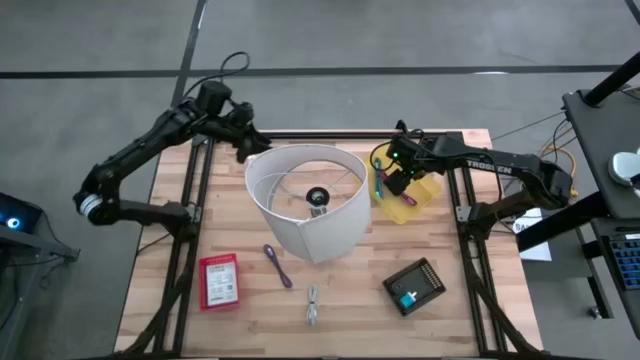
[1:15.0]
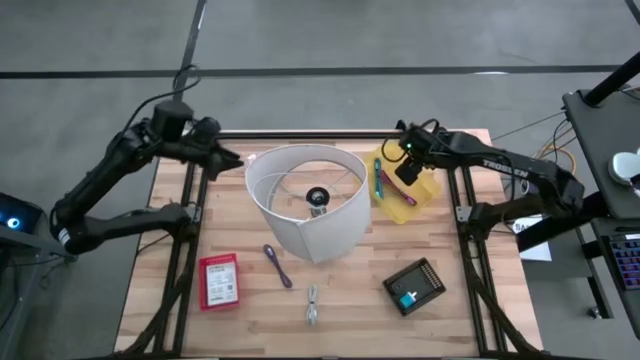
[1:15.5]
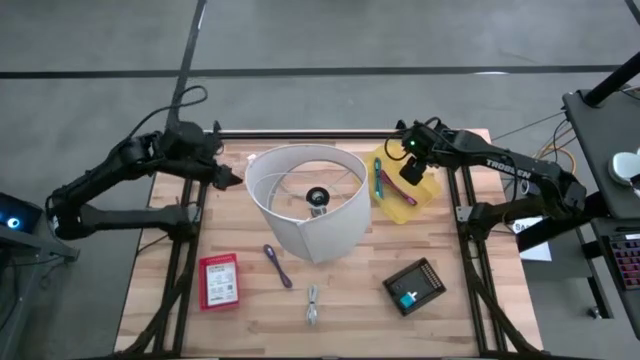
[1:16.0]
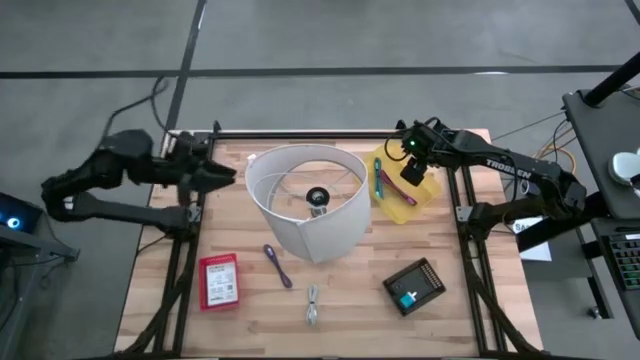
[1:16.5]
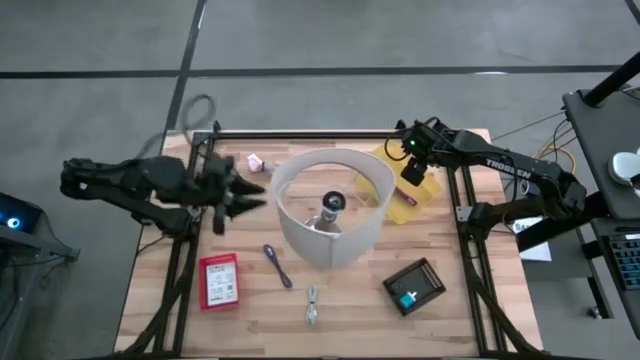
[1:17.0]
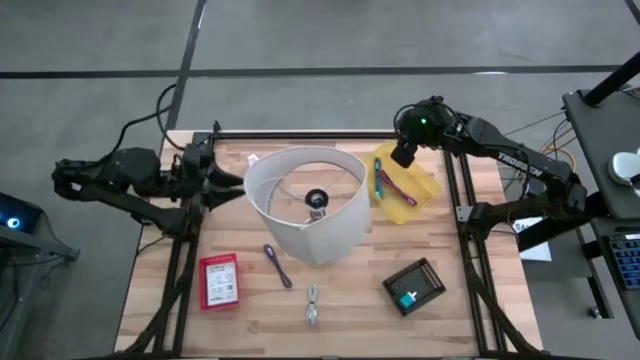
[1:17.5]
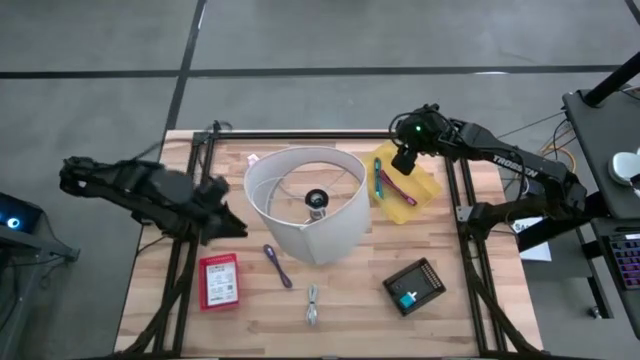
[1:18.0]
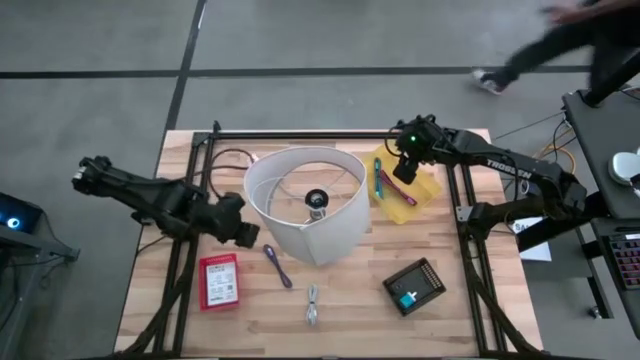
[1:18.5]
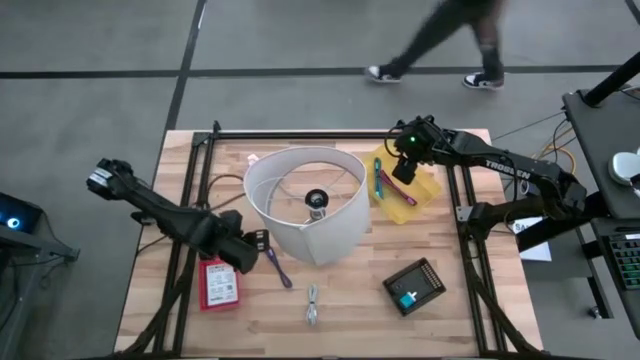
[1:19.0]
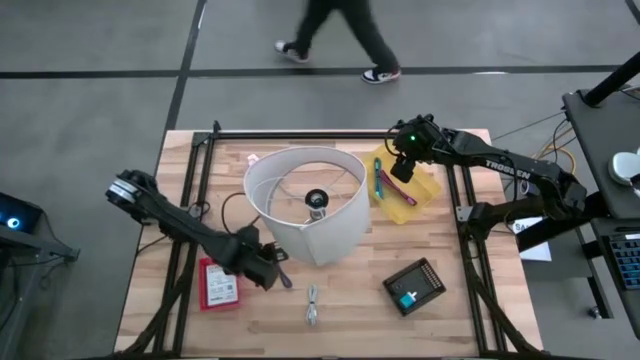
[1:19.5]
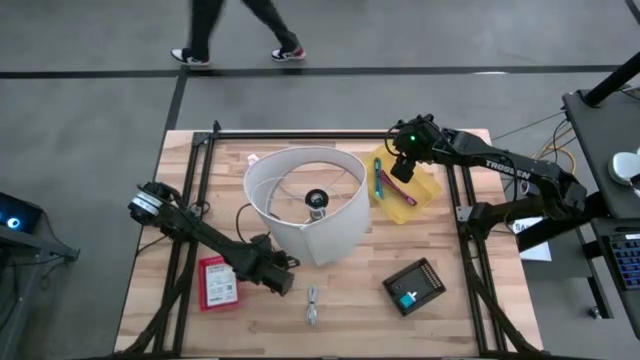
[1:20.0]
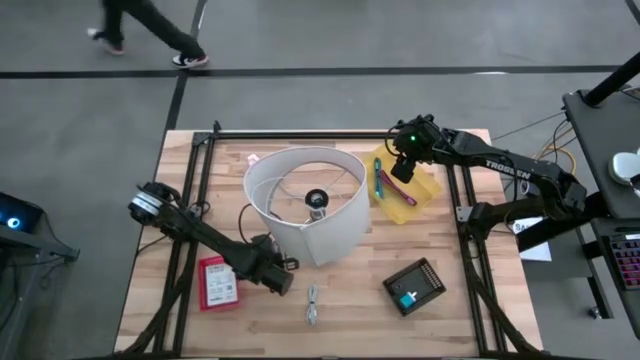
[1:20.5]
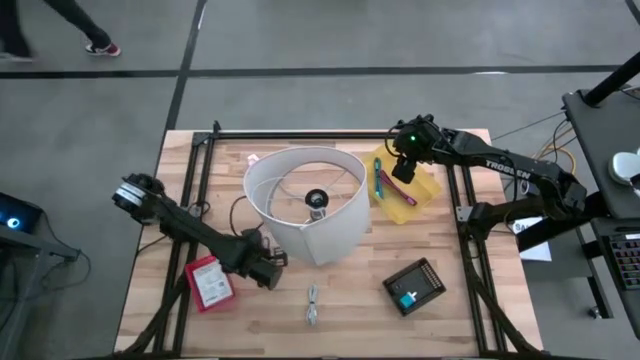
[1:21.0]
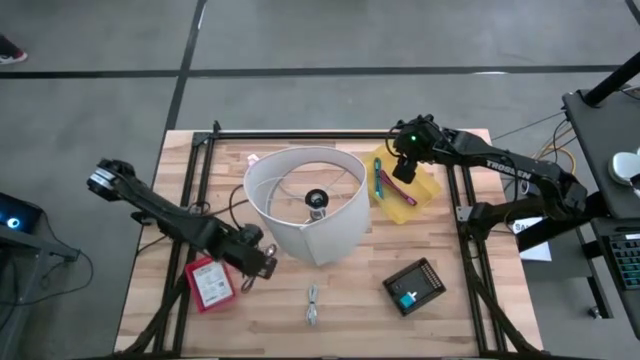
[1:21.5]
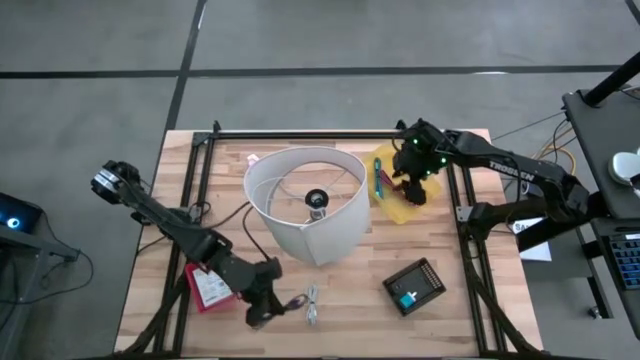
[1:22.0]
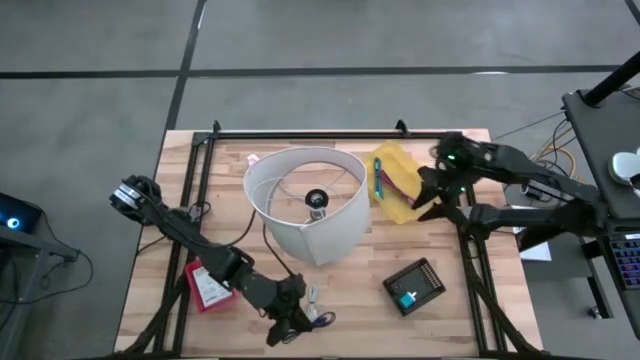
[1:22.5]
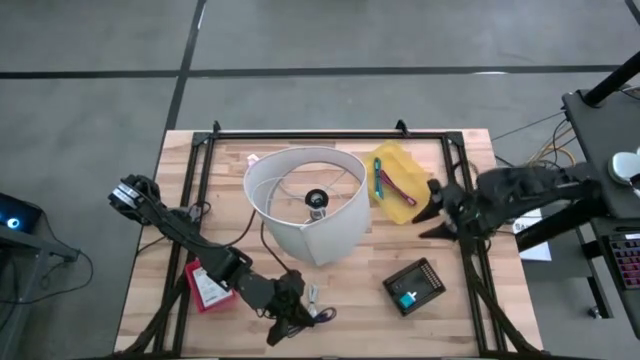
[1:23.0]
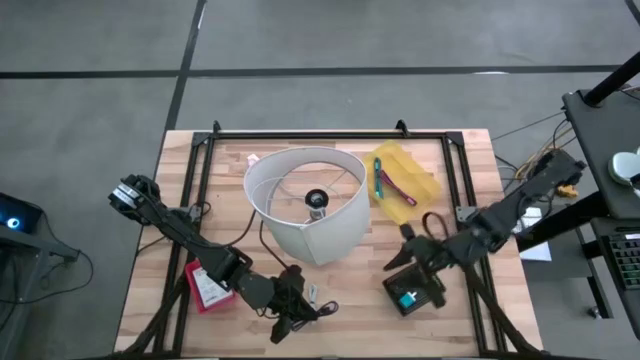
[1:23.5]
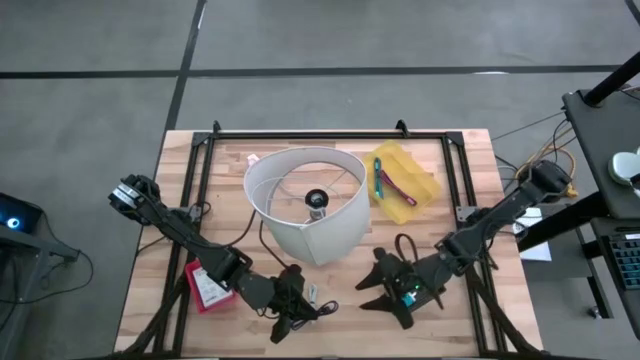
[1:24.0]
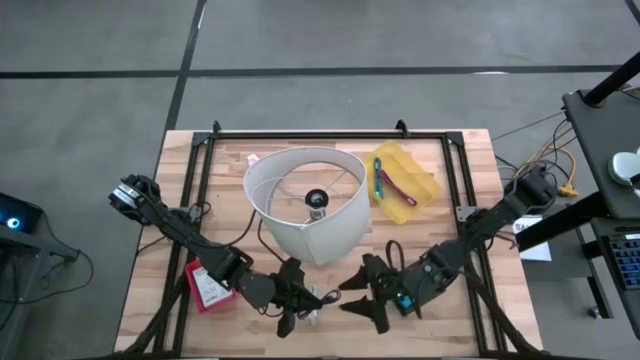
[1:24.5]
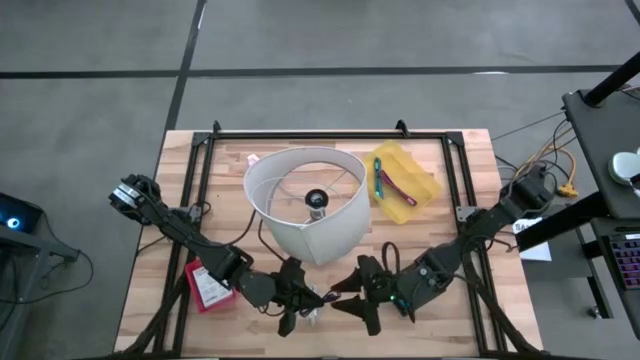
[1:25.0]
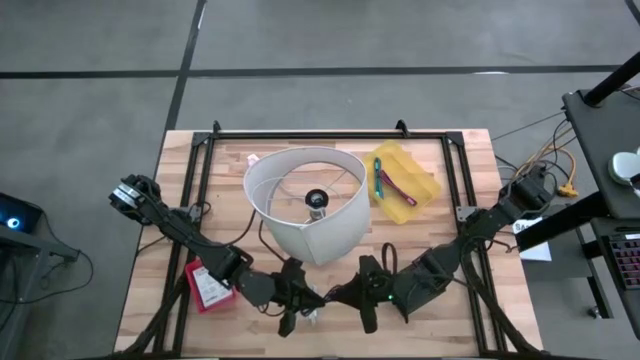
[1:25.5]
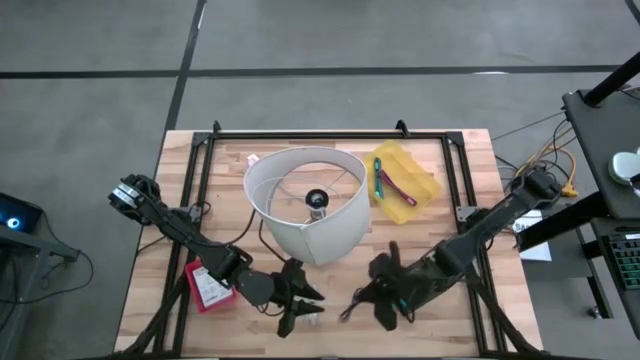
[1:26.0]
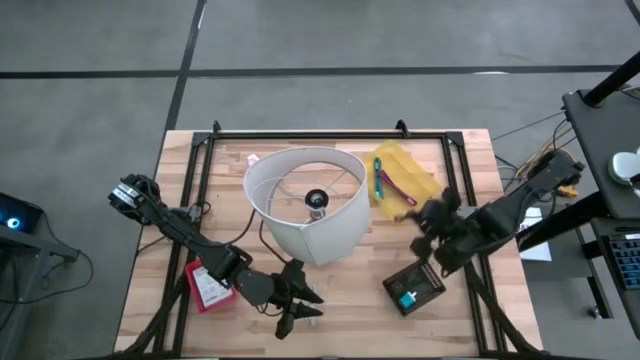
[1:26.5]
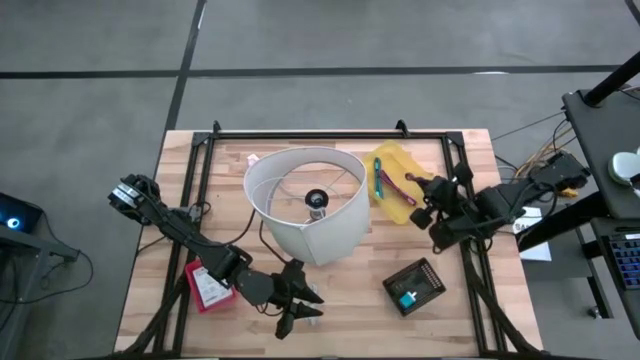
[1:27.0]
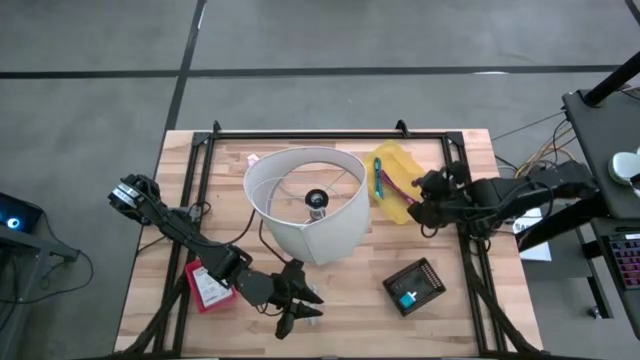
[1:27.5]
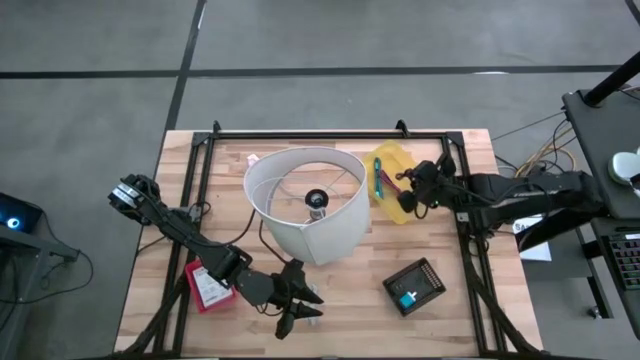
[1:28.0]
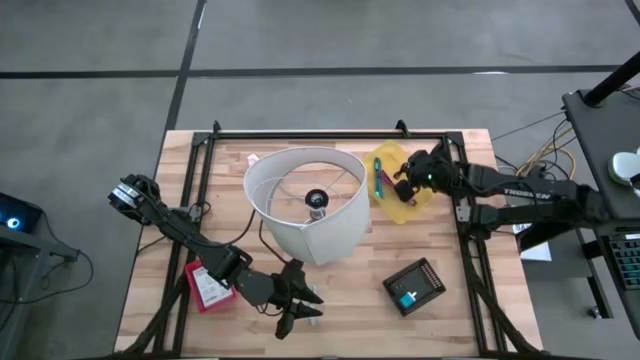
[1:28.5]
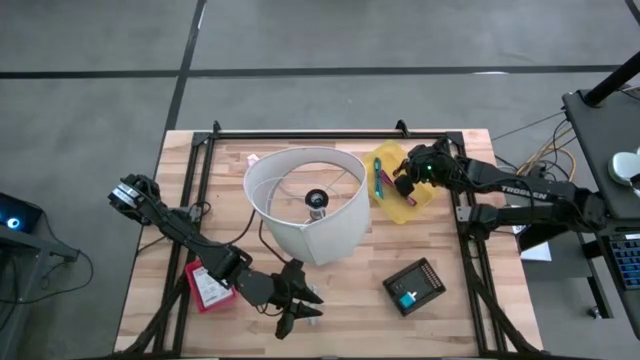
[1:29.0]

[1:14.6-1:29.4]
Task: Pick and place items into bin
Put the dark blue USB cable into the yellow bin

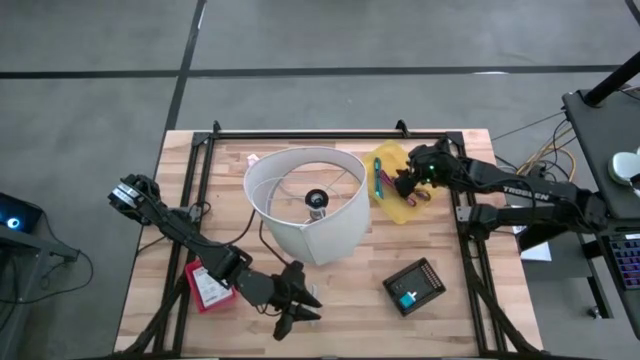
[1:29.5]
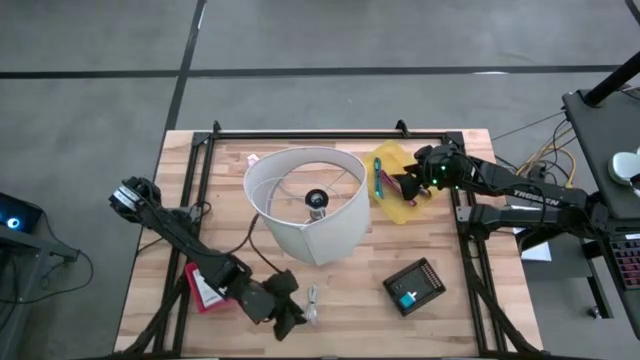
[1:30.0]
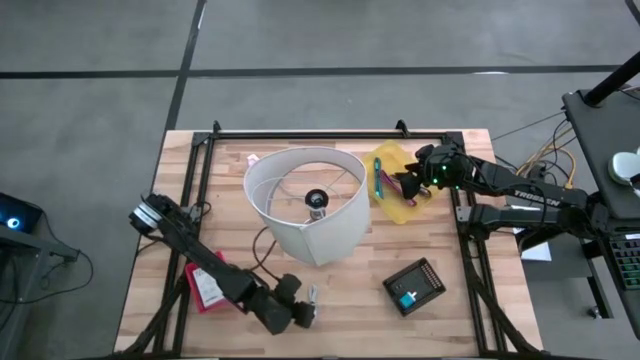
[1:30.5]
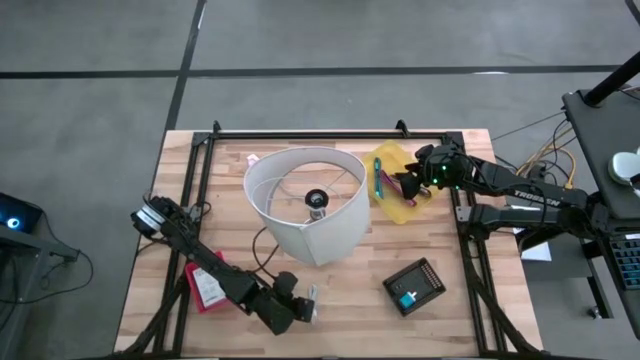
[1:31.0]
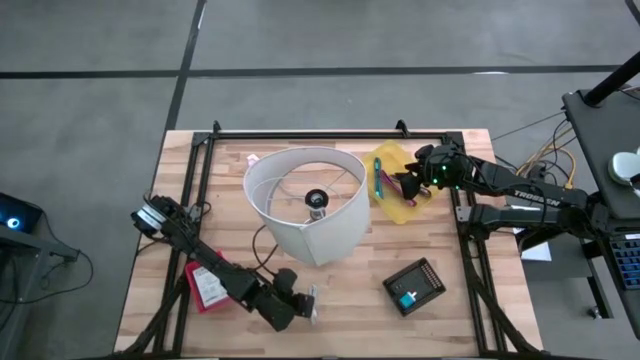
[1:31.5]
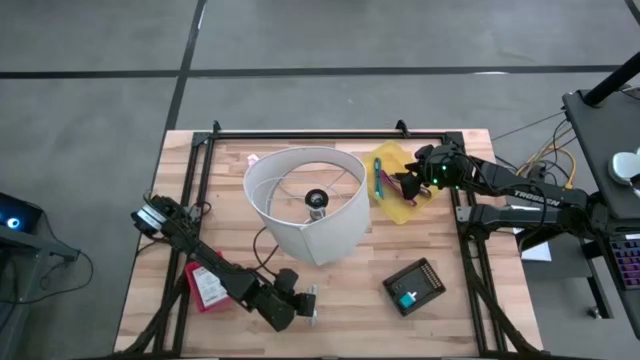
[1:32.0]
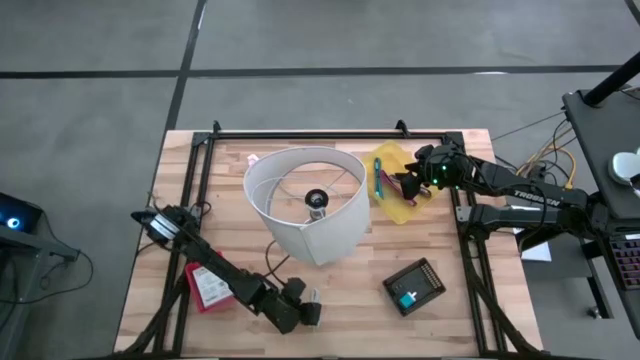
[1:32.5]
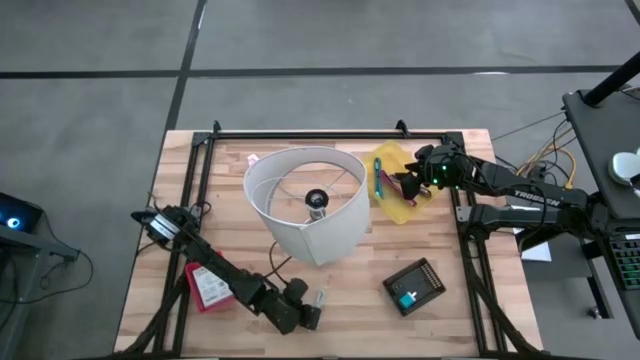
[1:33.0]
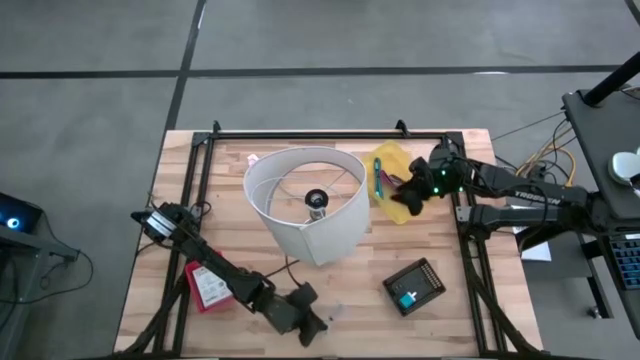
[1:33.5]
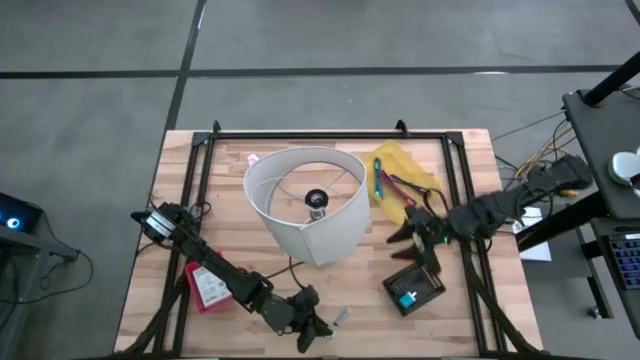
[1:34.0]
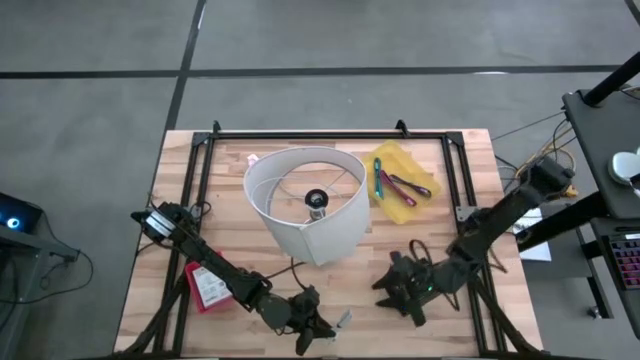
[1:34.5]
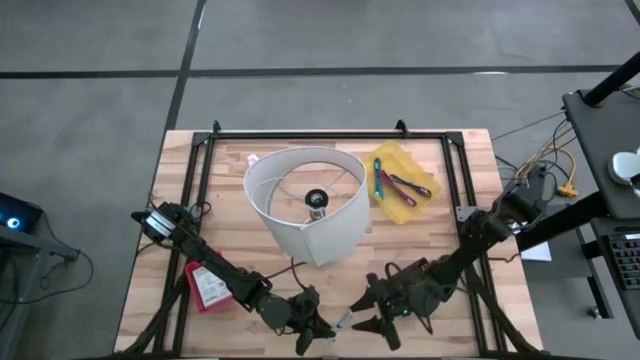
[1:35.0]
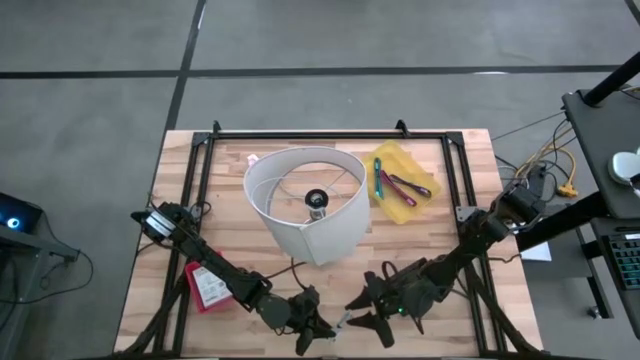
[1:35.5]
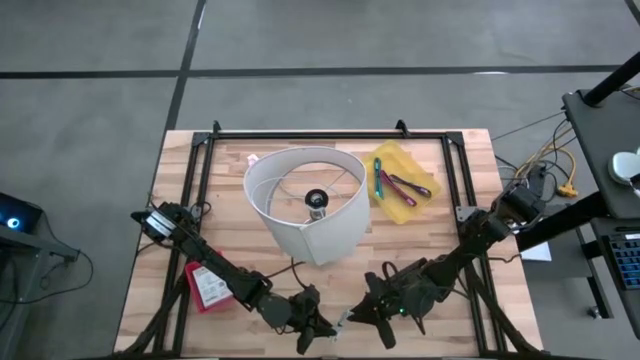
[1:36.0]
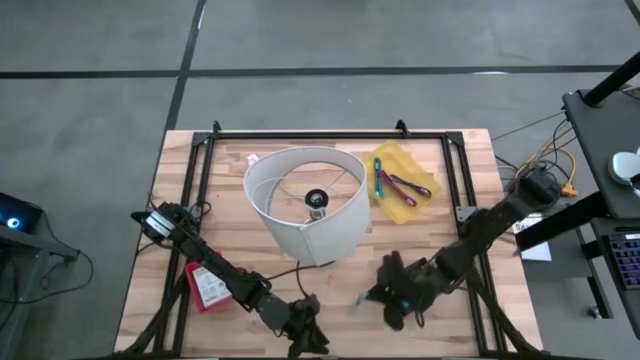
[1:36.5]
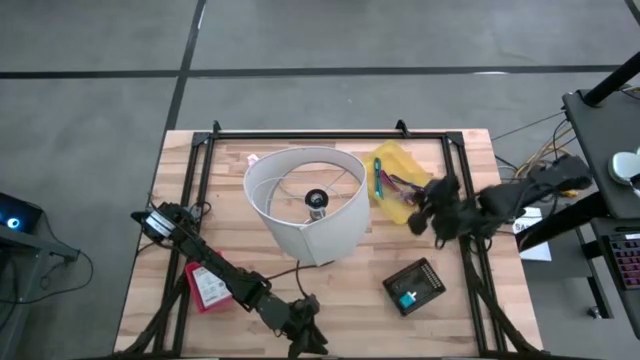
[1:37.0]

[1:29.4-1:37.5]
Put the white USB cable into the yellow bin
